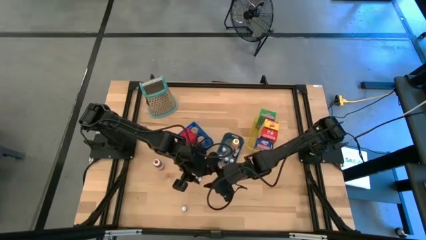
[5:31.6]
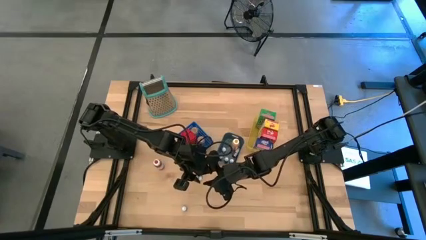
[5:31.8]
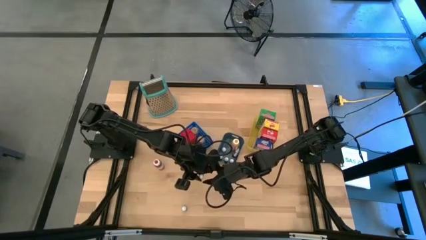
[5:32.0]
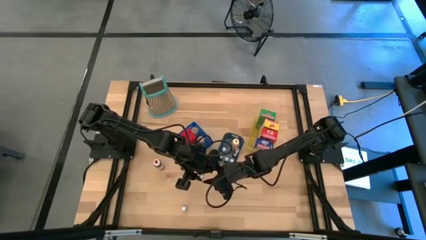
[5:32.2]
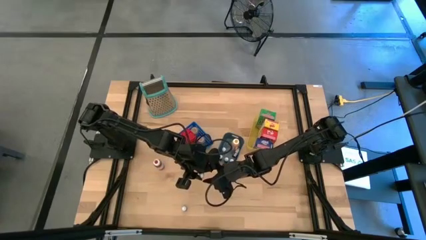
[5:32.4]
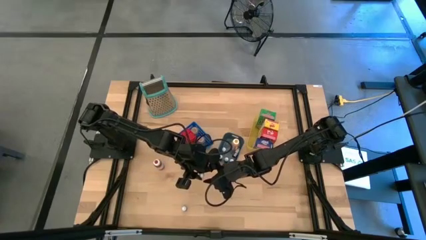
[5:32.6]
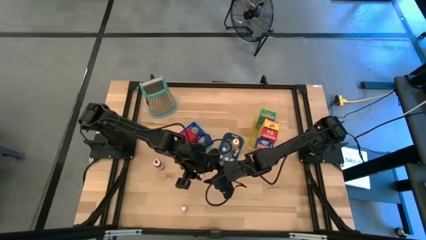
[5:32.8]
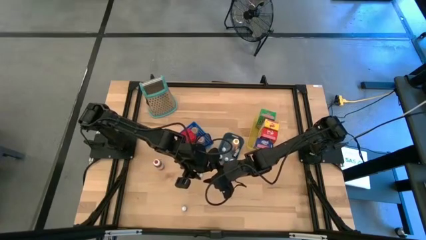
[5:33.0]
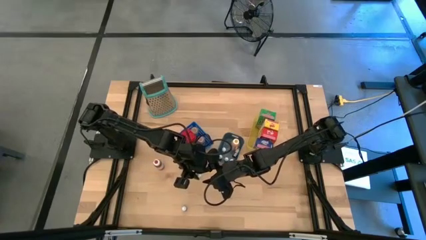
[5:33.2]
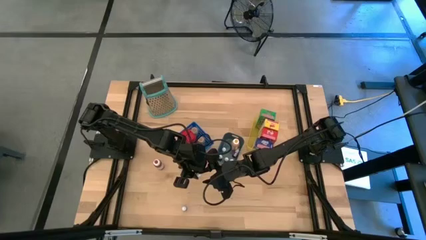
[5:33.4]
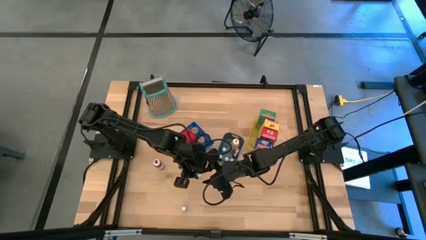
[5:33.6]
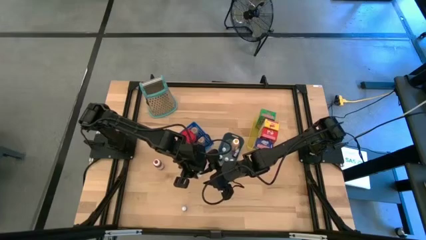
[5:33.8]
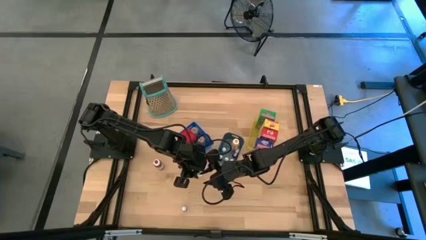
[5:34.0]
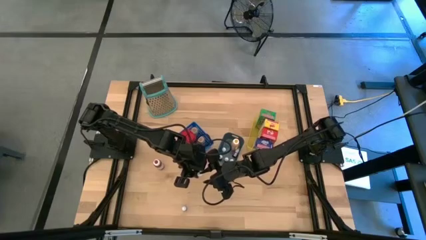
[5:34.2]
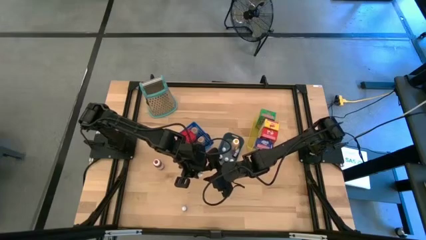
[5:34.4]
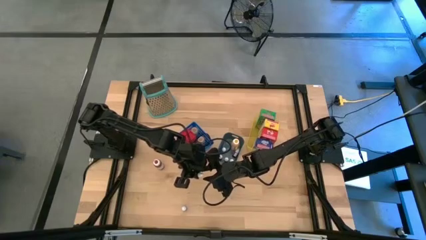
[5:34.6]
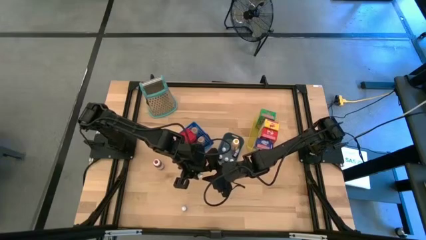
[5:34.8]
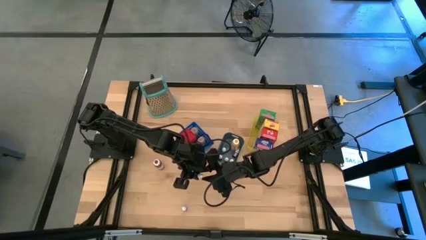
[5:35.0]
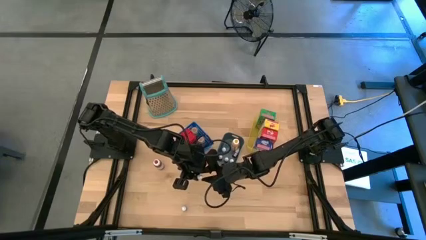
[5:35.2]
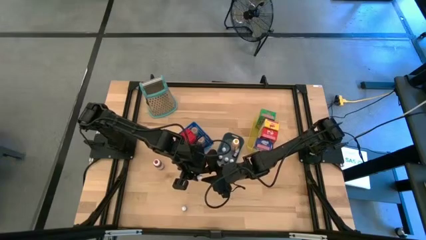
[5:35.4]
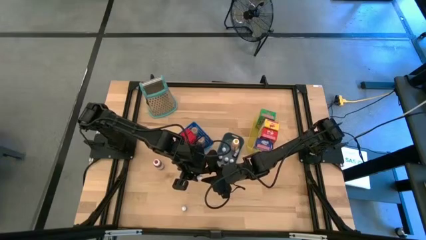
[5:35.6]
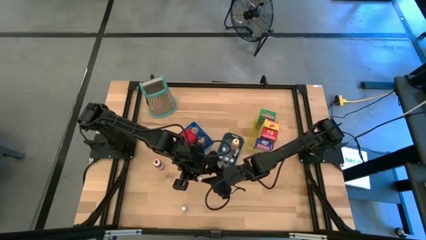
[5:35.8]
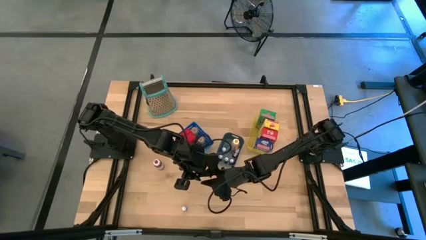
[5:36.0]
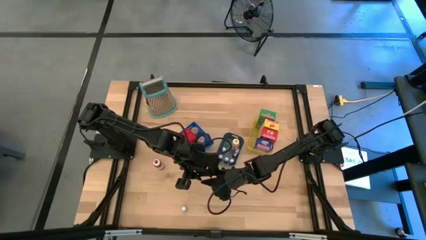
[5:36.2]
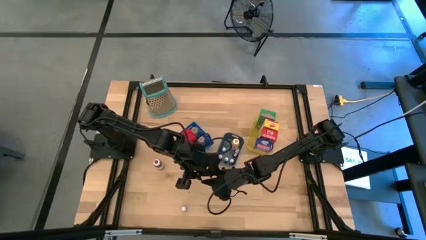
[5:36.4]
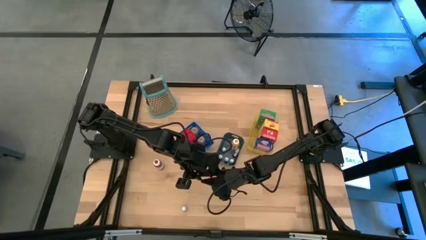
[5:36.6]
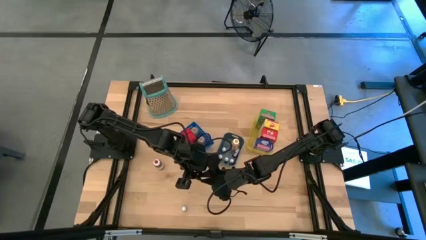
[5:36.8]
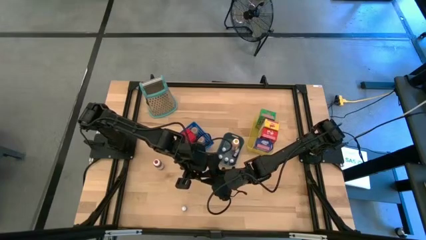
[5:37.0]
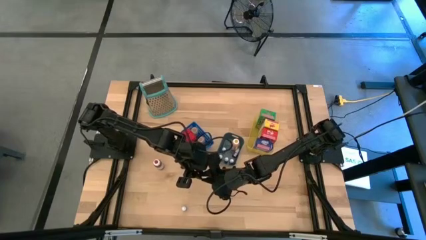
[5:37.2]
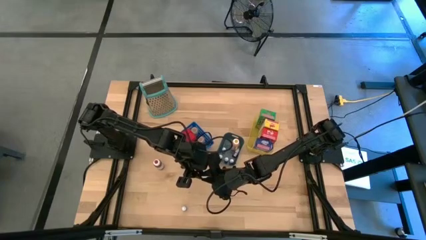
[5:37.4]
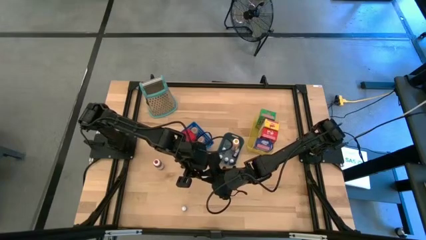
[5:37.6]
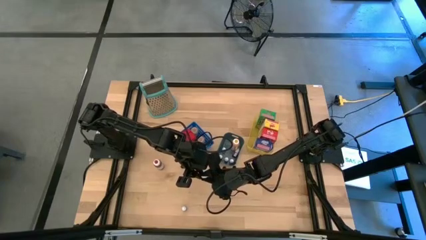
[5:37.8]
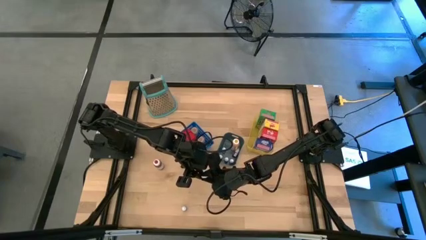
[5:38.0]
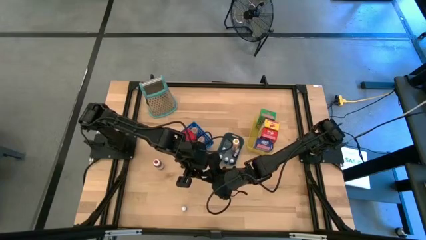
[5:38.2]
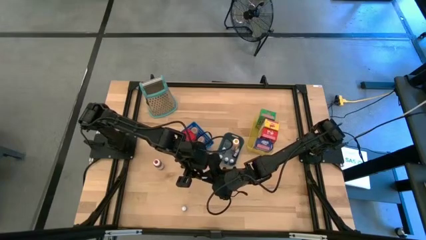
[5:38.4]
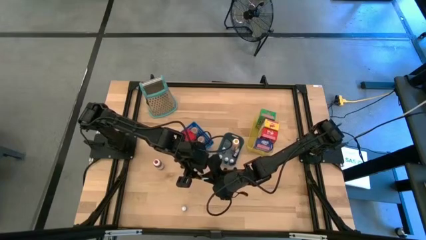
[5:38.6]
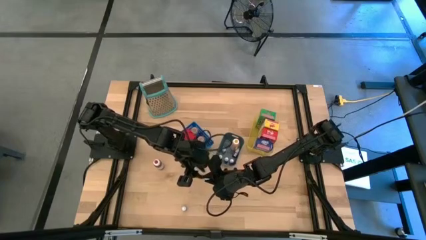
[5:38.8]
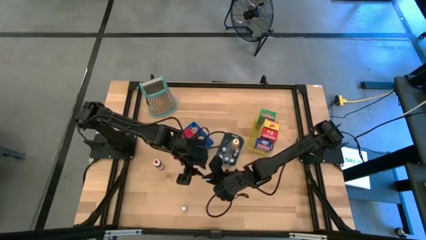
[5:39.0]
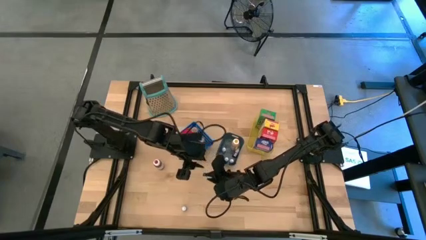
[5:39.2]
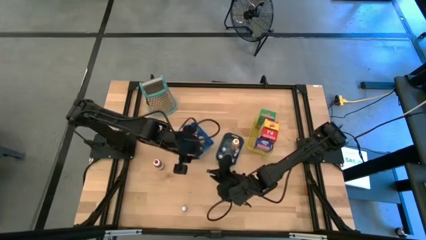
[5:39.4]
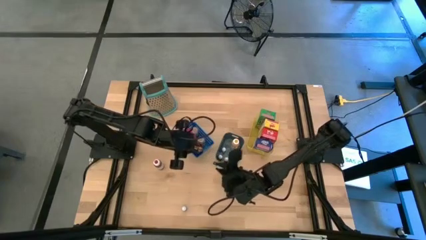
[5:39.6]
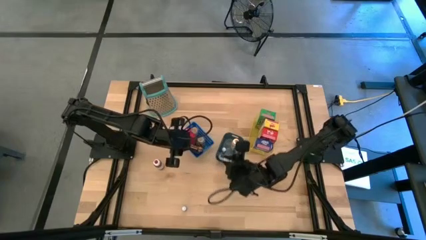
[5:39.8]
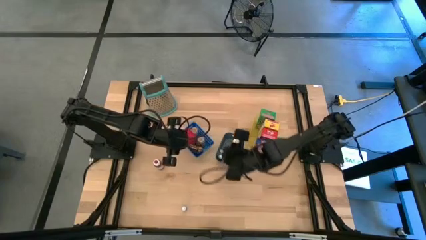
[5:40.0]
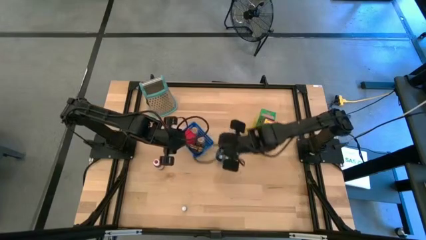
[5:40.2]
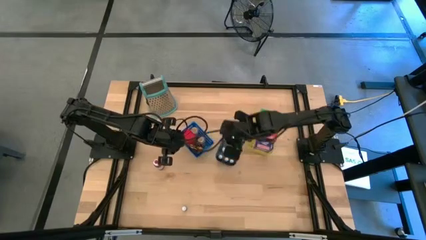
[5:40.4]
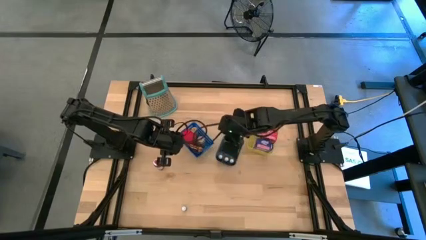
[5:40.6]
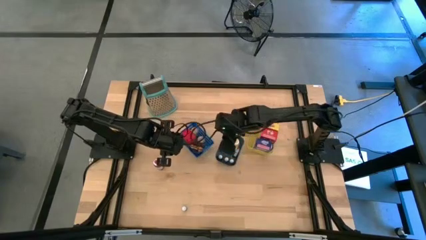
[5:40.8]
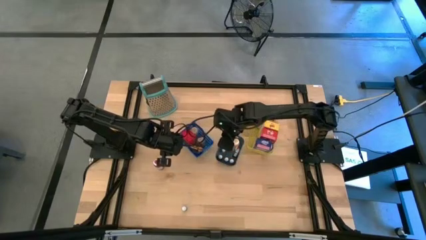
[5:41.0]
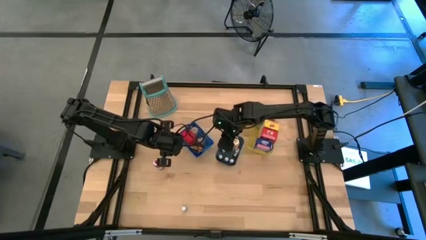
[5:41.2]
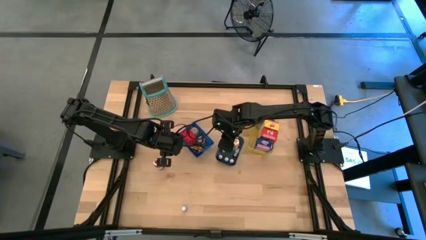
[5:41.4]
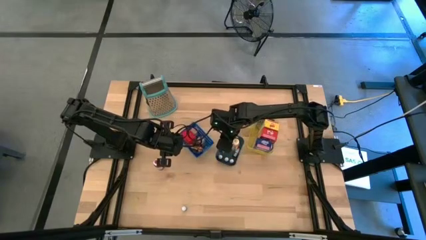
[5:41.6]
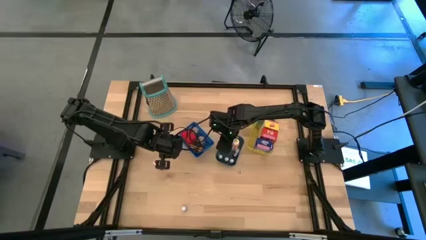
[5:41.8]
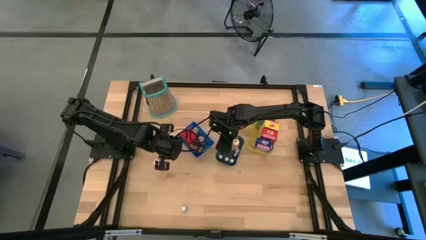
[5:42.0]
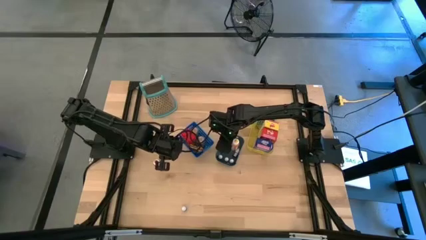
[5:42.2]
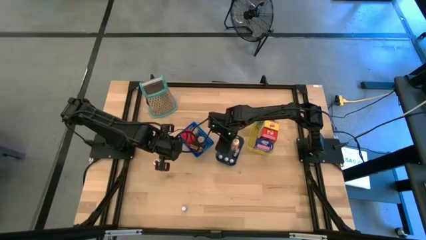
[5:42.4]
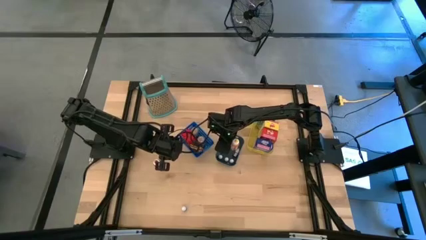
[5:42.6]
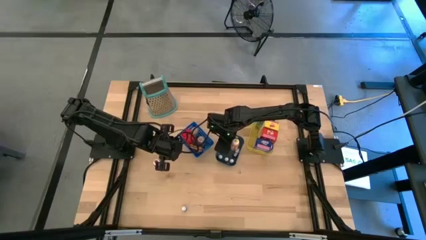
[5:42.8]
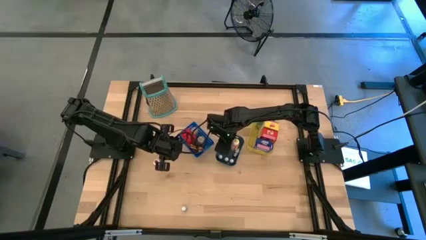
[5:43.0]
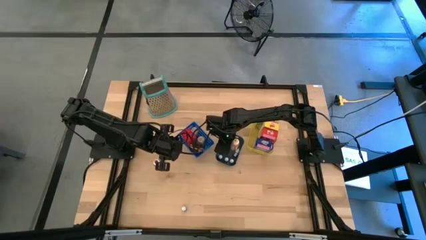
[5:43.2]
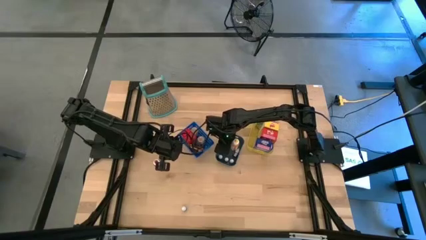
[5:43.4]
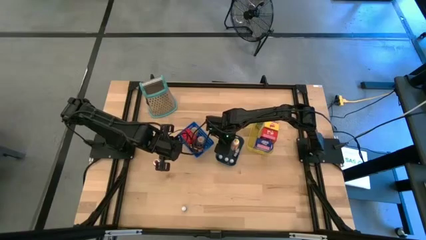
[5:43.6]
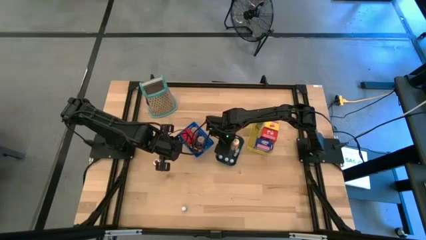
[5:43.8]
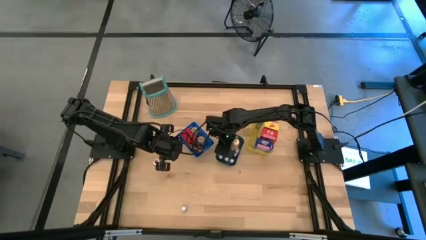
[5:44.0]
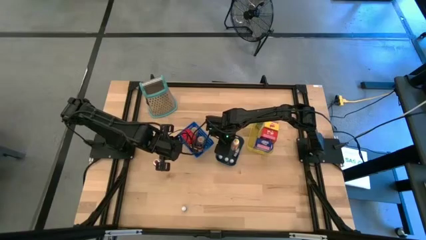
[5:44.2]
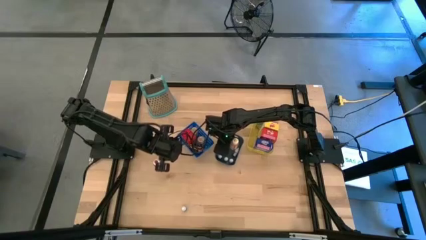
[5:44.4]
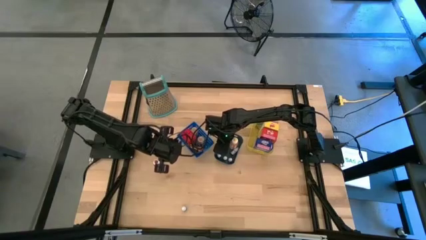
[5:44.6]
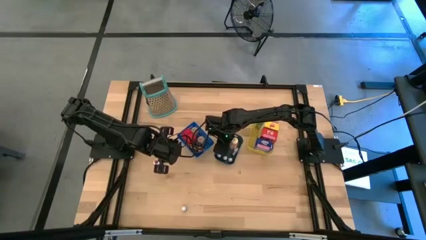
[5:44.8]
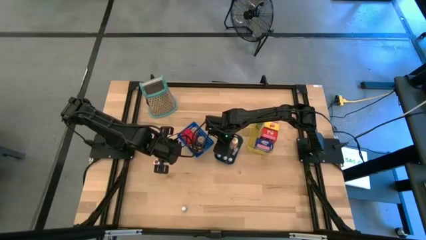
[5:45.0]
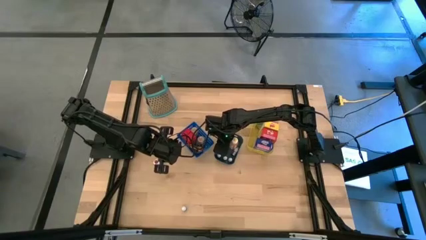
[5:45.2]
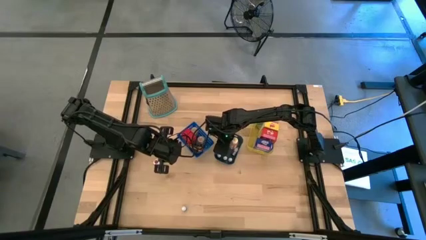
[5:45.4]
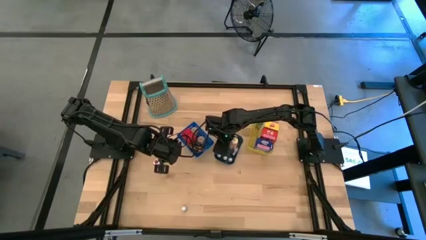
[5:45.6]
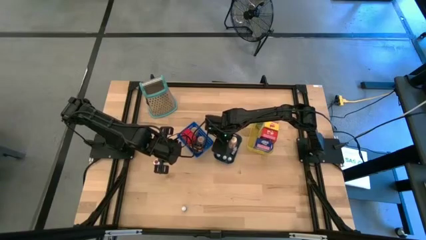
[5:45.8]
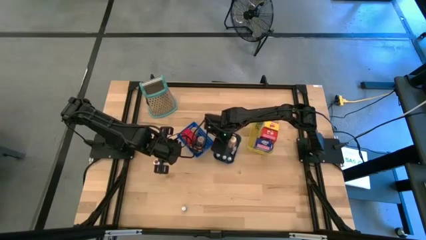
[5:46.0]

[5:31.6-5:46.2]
Task: Pick & Place Kitchen Items
Put the black food coloring bottle into the green bin
